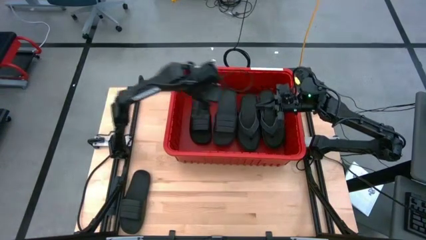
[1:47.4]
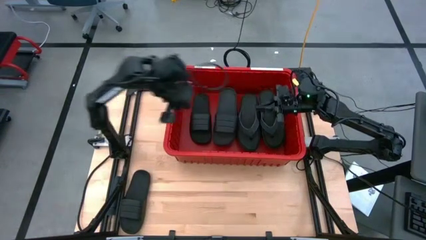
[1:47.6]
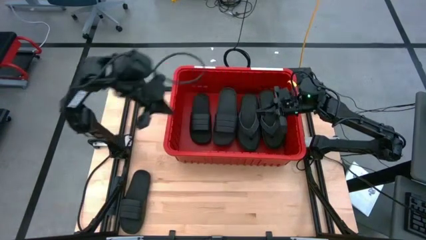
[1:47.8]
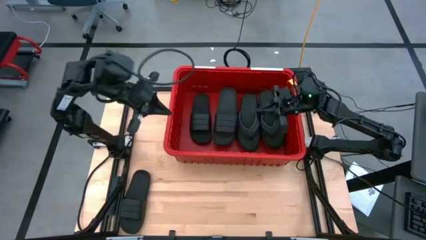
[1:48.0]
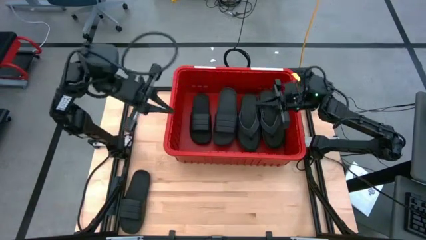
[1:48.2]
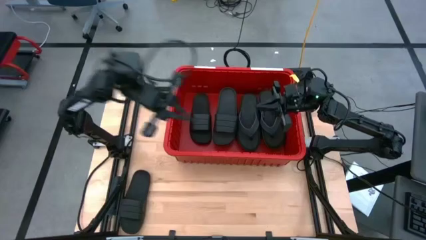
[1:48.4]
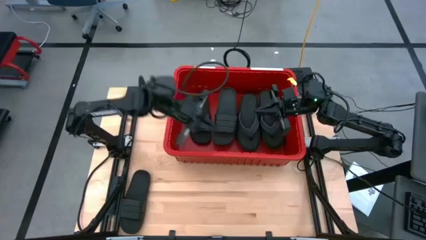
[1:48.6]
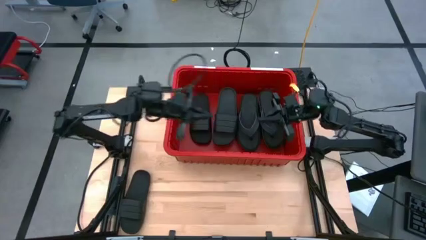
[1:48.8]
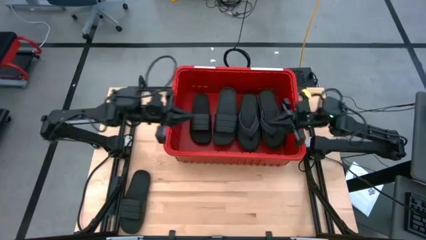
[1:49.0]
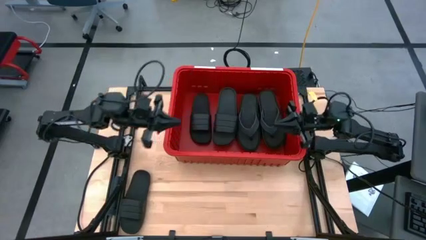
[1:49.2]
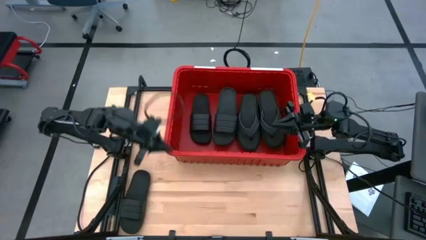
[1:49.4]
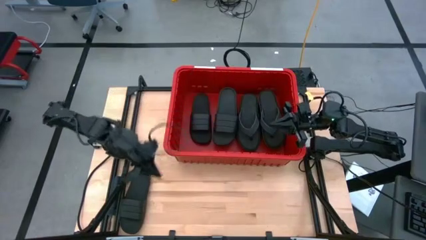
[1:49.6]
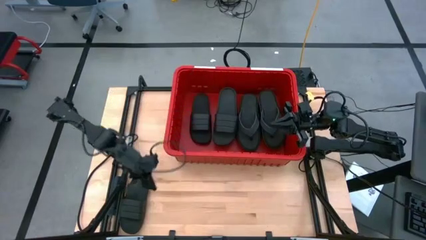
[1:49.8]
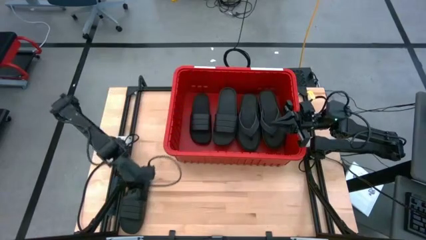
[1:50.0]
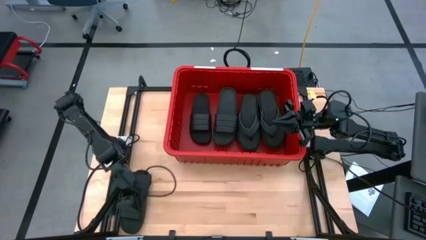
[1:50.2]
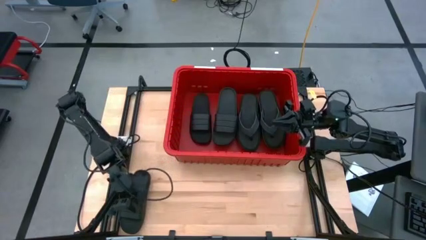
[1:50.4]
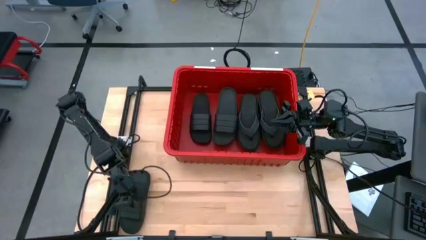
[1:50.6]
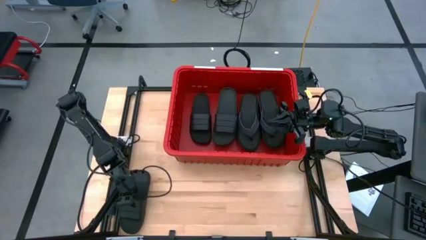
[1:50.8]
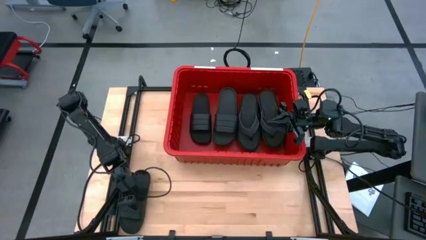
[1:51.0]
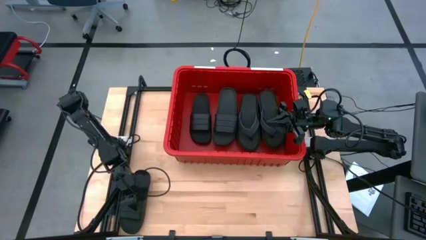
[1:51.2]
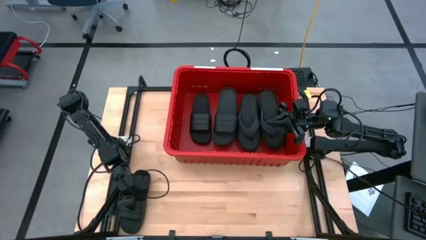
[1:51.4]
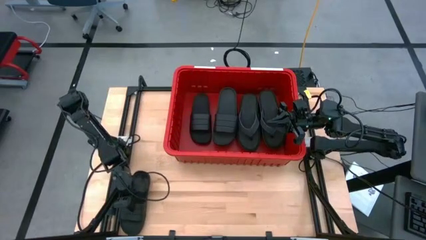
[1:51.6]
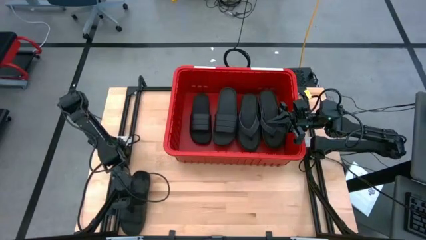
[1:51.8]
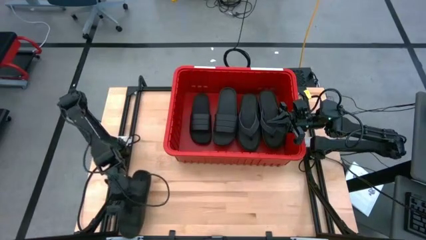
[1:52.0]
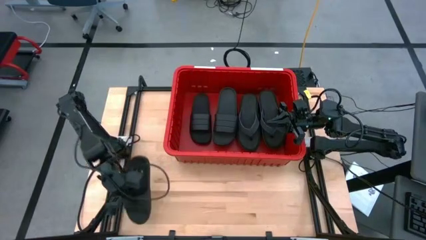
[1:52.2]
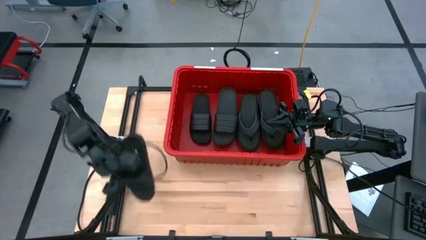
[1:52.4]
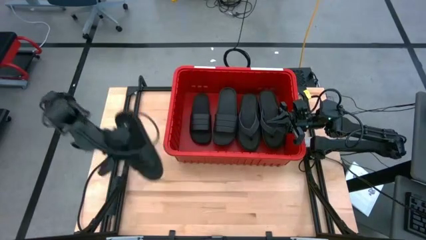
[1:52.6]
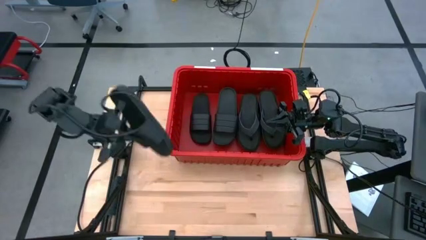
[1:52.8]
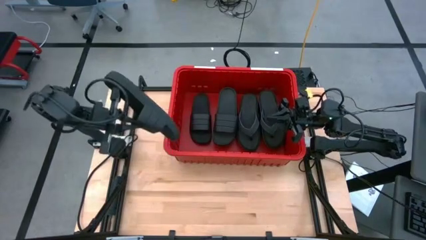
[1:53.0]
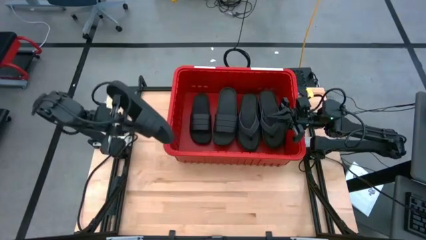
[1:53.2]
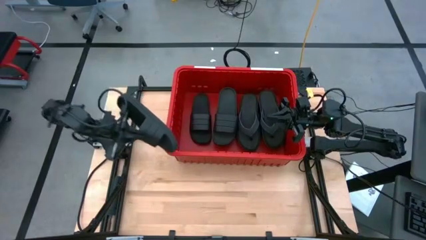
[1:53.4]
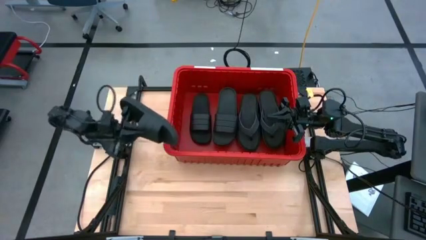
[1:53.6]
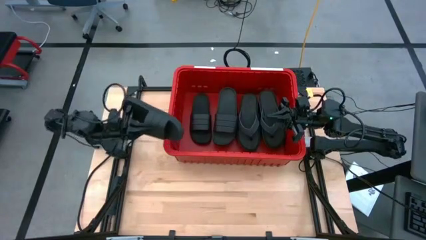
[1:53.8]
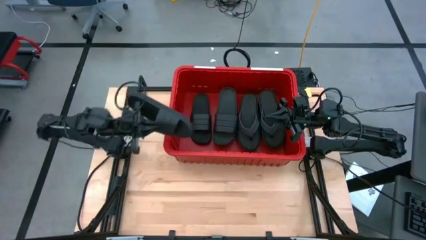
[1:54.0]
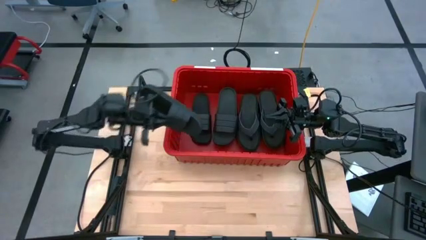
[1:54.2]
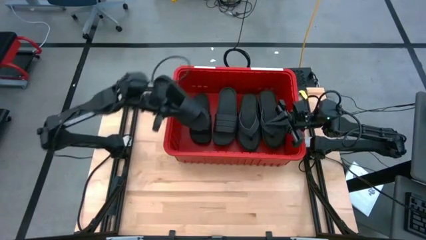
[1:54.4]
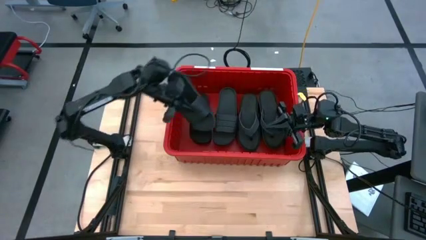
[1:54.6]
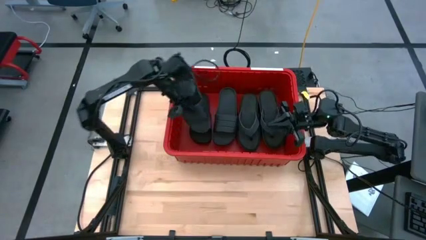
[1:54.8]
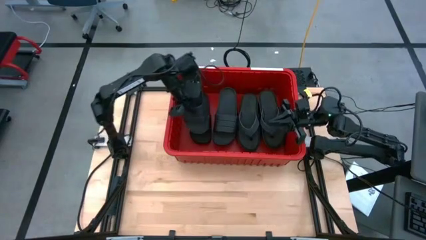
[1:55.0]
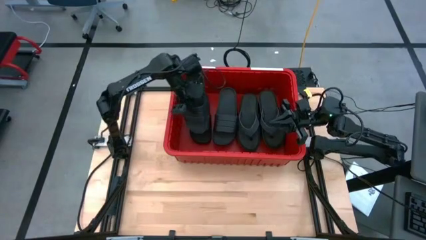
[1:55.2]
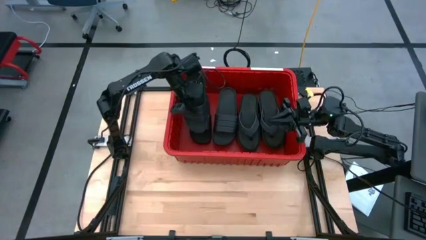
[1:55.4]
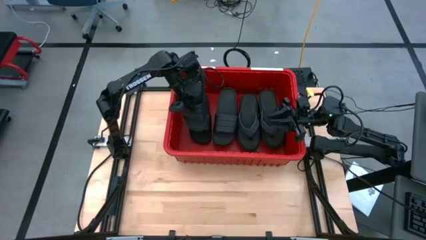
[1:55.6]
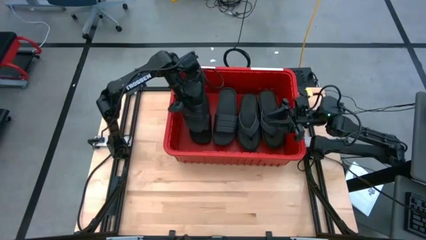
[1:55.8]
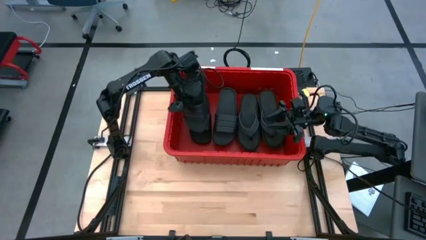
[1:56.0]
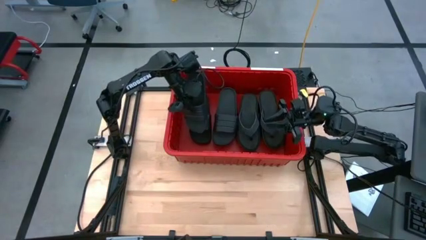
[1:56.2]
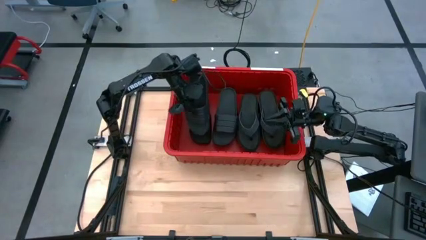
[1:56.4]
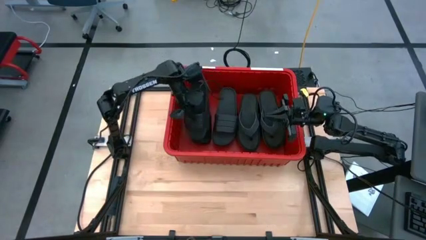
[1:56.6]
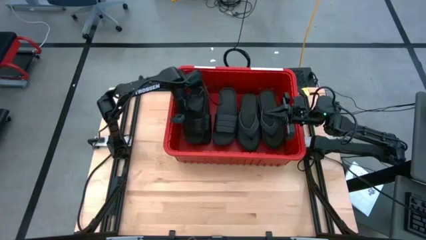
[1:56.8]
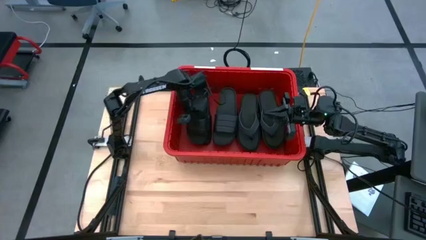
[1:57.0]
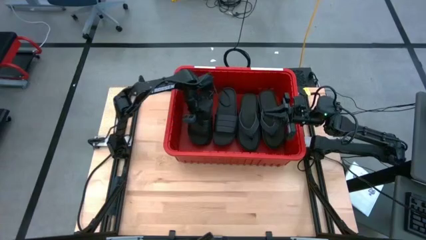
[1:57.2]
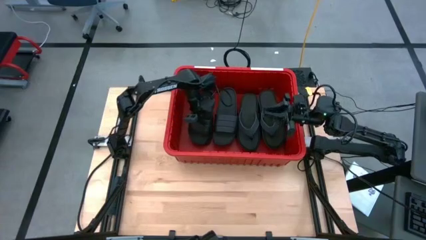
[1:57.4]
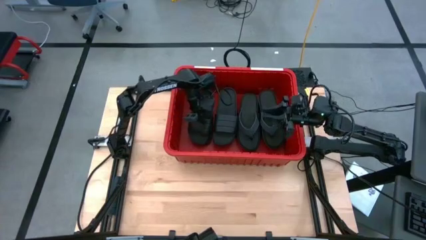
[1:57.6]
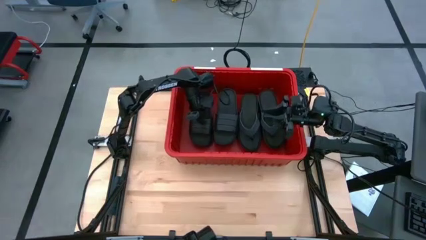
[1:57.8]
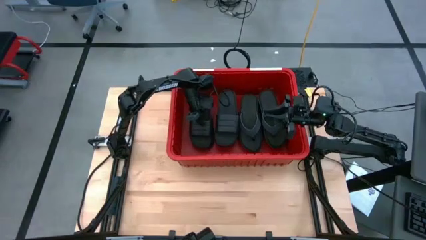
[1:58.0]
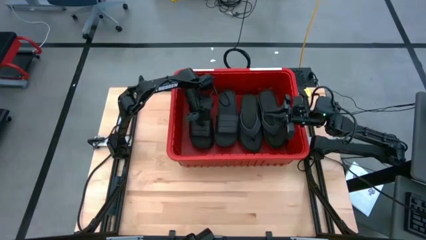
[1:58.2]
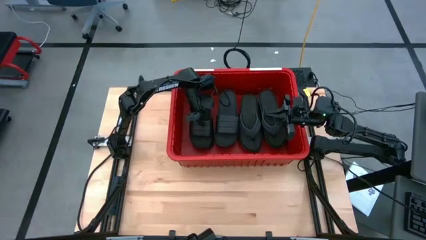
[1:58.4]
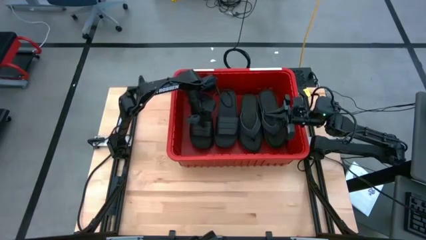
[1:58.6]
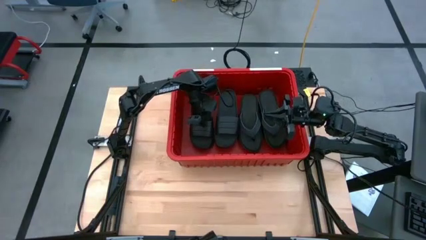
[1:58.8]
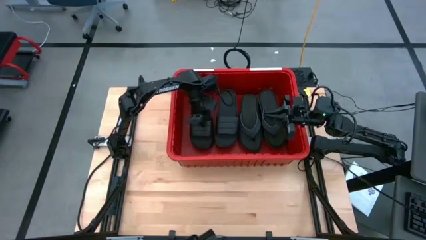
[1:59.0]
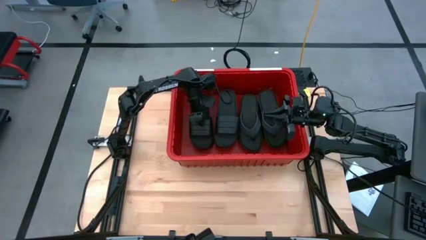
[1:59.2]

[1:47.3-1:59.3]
Task: Pick and place slides into bin
Stack the black slipper on top of the black slipper

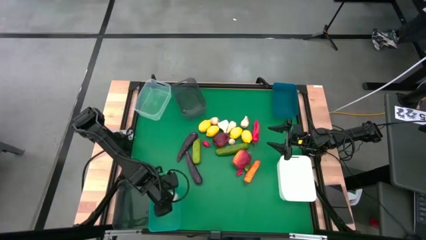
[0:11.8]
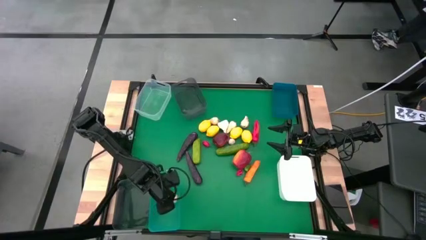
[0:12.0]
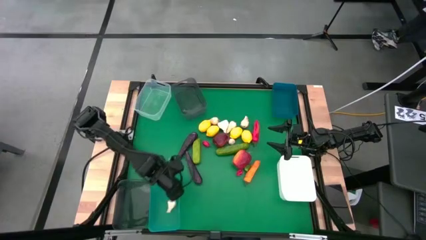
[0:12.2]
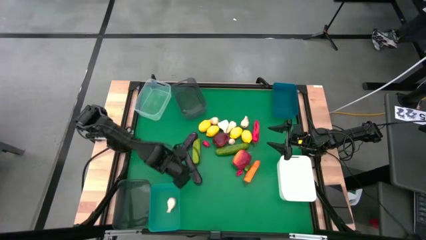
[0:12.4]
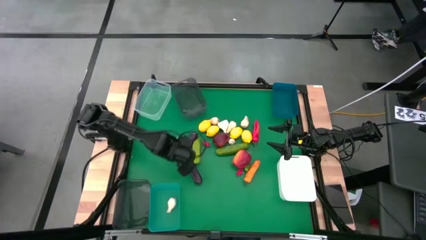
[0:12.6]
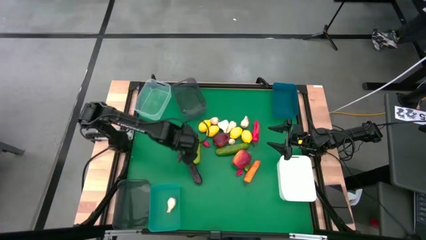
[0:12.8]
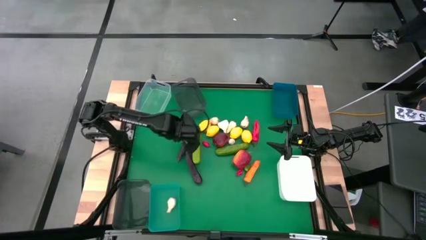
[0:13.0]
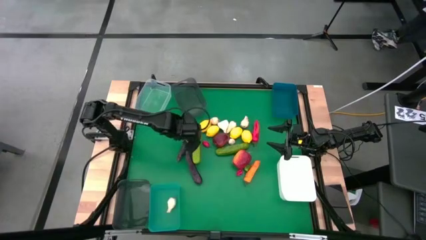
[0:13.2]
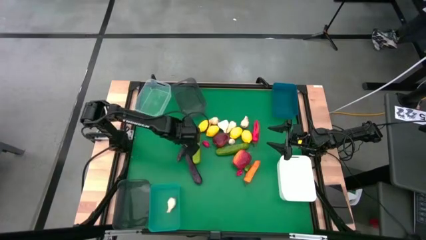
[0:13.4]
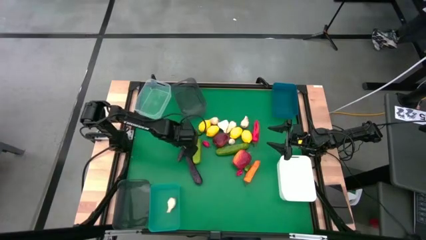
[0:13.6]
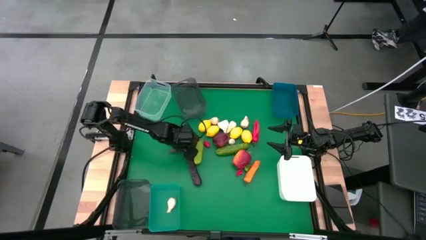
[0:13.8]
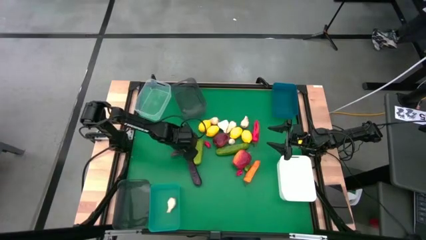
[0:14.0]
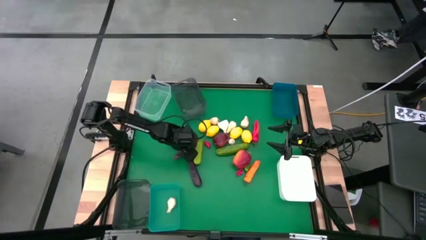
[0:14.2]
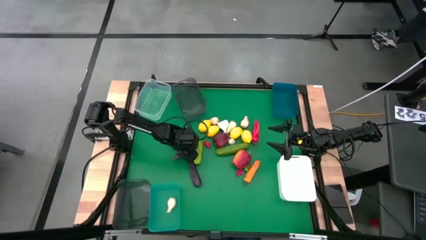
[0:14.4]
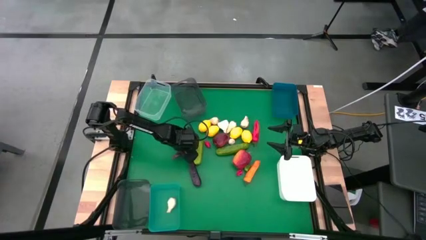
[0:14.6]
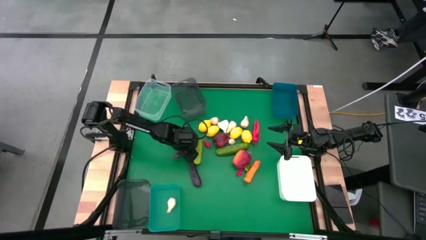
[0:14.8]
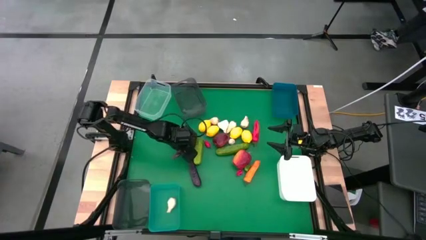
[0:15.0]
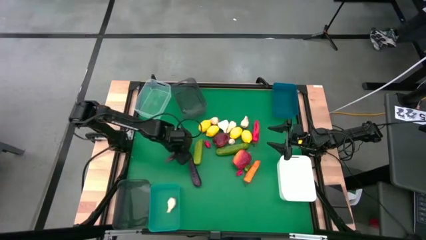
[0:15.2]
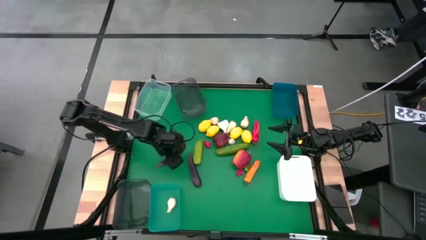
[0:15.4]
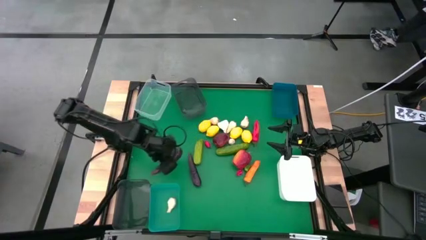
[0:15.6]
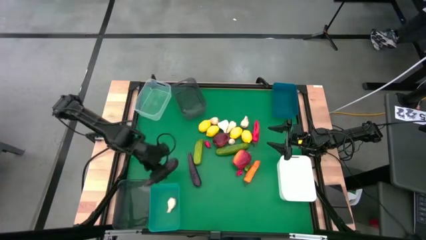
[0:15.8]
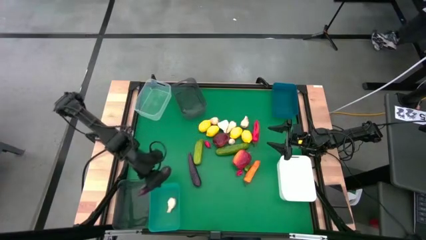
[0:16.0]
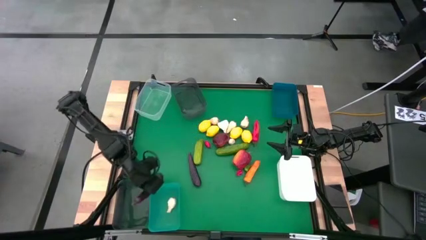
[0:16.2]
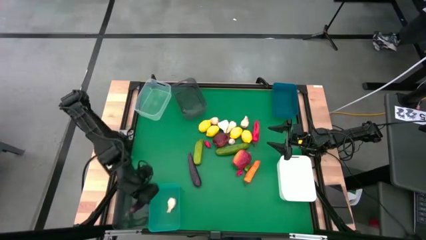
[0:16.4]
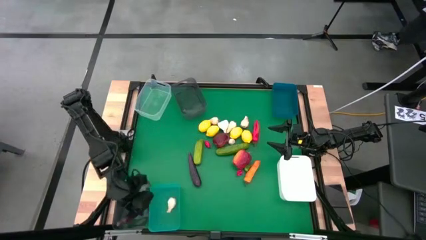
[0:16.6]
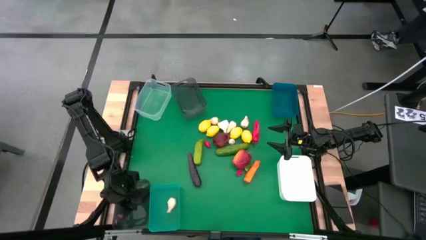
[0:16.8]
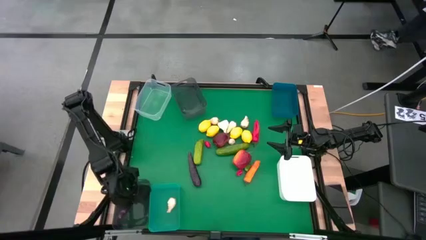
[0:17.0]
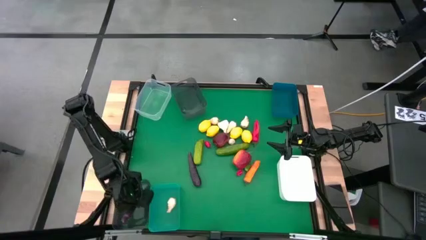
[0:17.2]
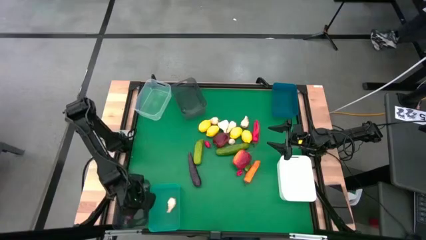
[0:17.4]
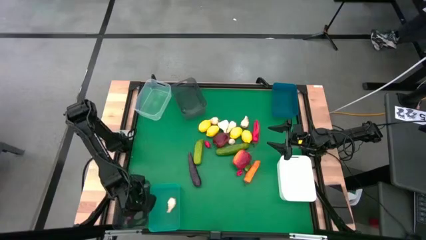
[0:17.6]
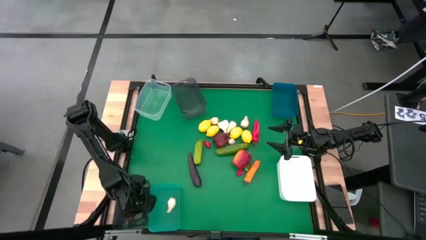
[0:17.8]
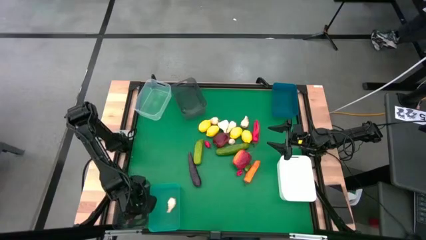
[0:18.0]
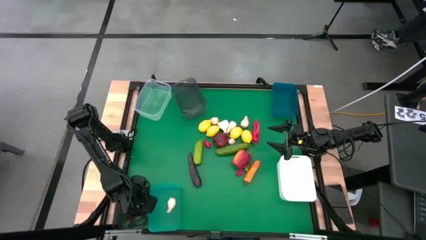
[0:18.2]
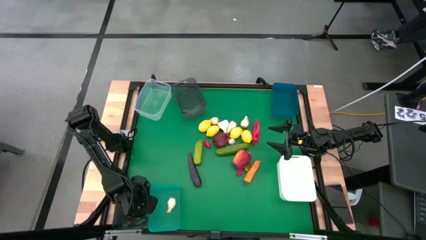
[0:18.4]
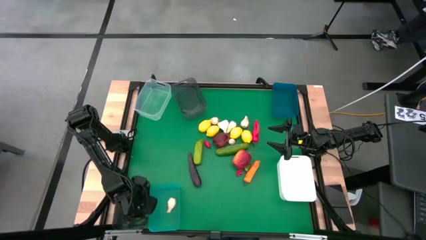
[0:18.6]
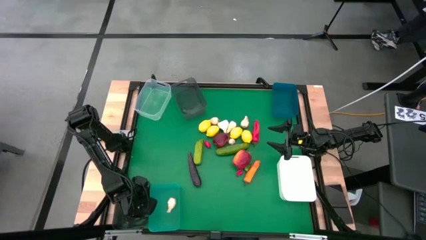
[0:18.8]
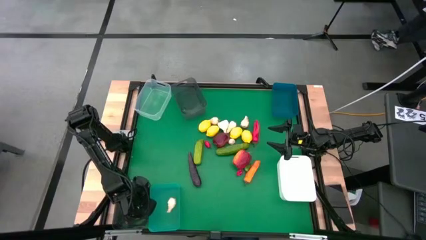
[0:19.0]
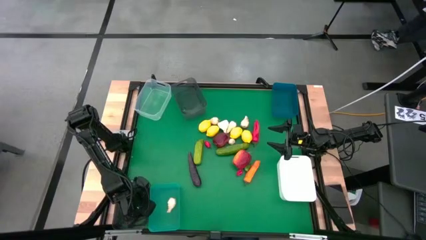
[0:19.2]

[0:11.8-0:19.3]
Task: Sort produce into baskets
Put the eggplant into the bottom black bin
